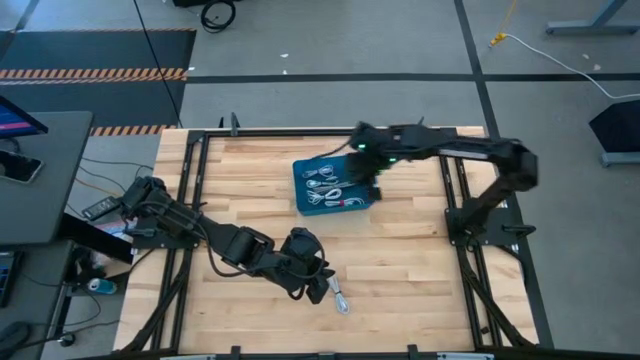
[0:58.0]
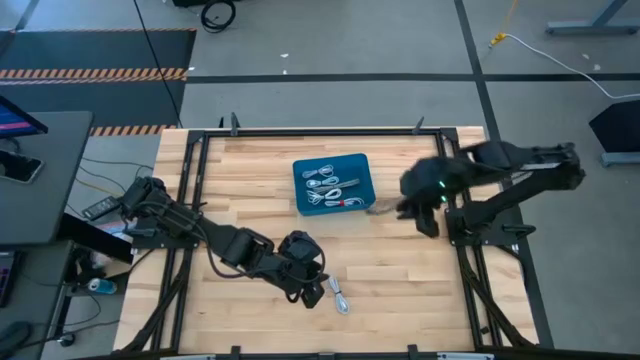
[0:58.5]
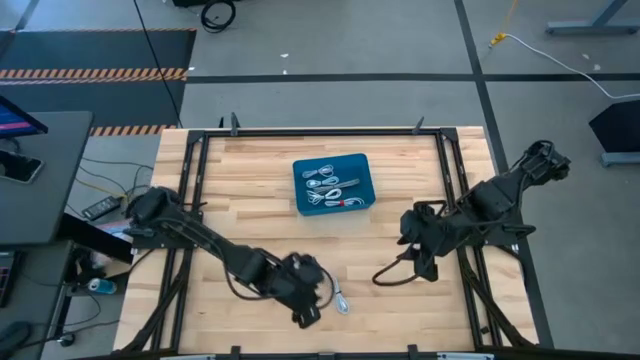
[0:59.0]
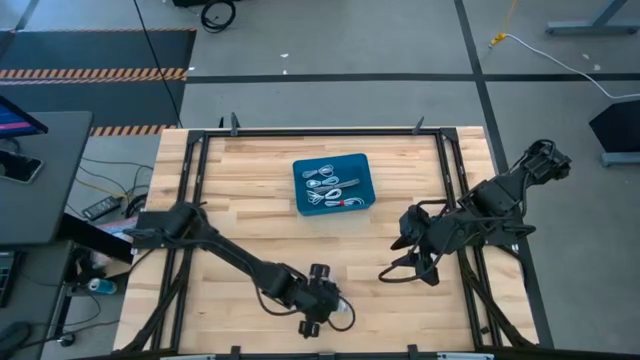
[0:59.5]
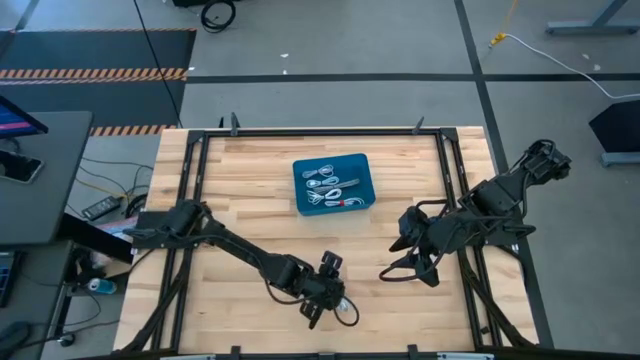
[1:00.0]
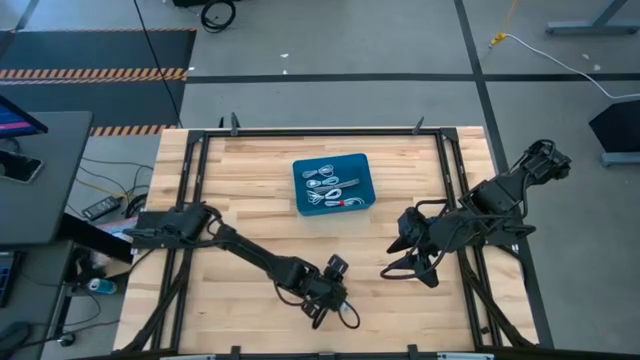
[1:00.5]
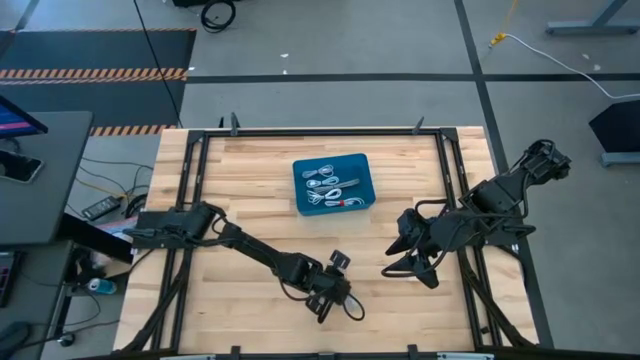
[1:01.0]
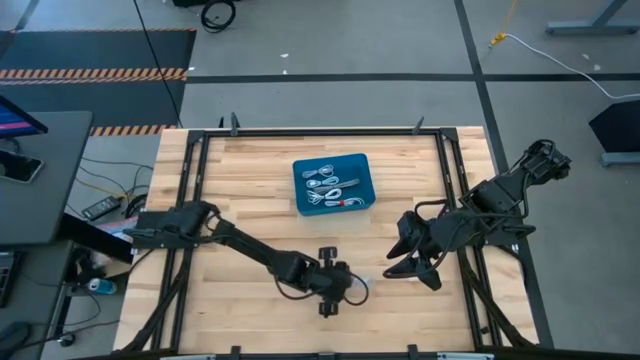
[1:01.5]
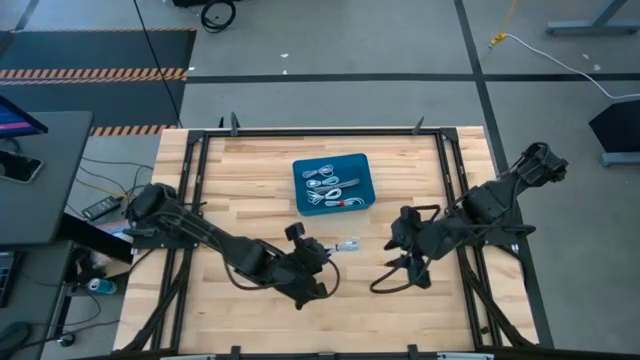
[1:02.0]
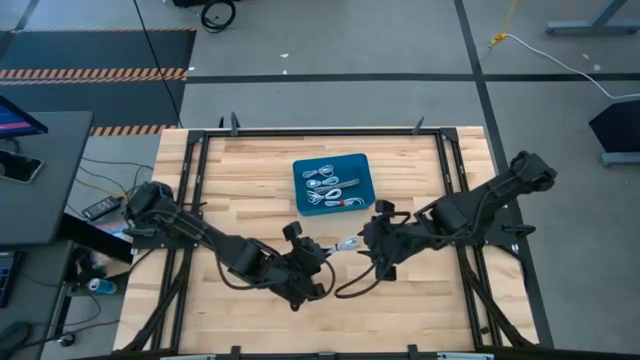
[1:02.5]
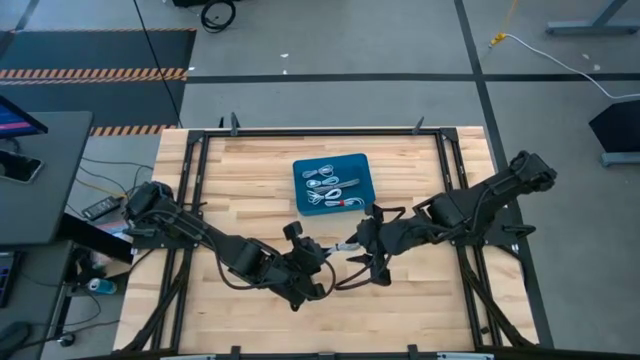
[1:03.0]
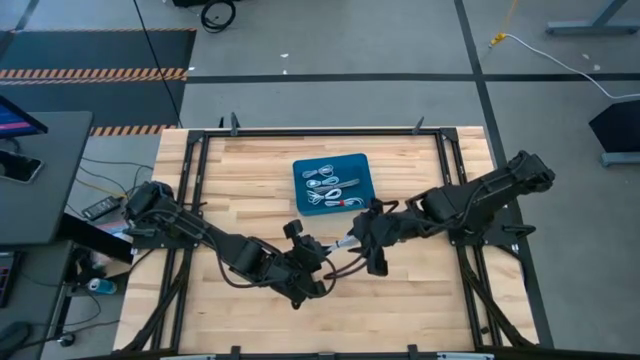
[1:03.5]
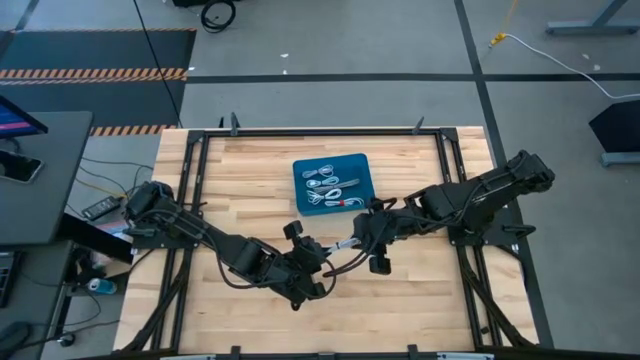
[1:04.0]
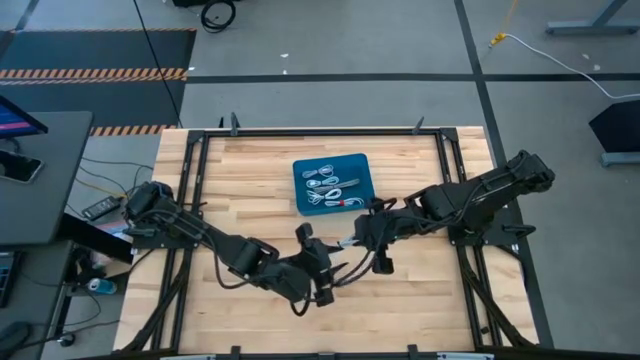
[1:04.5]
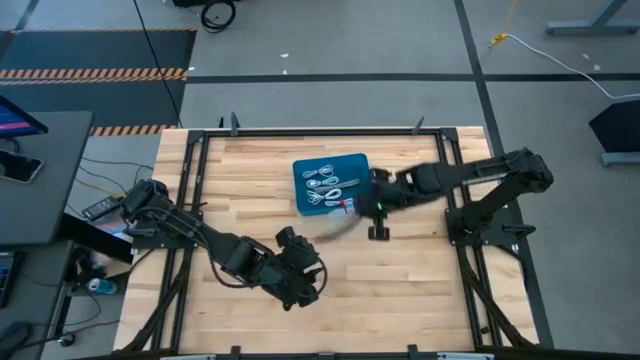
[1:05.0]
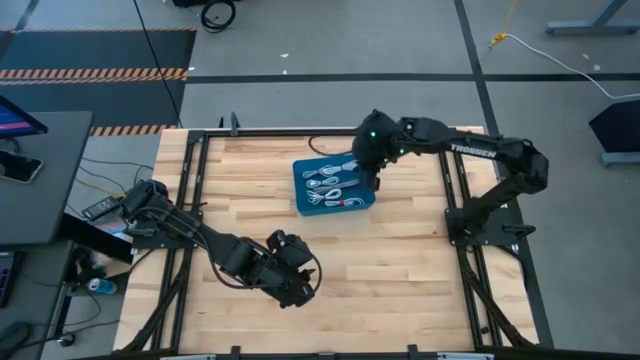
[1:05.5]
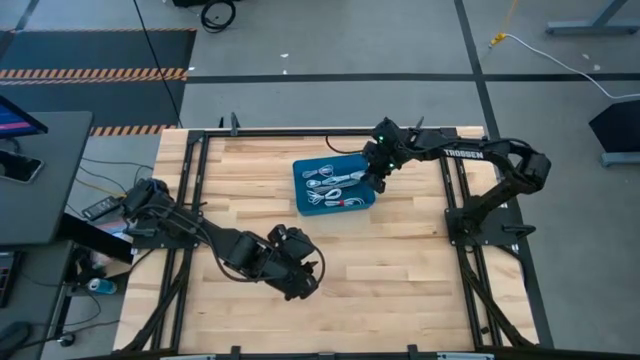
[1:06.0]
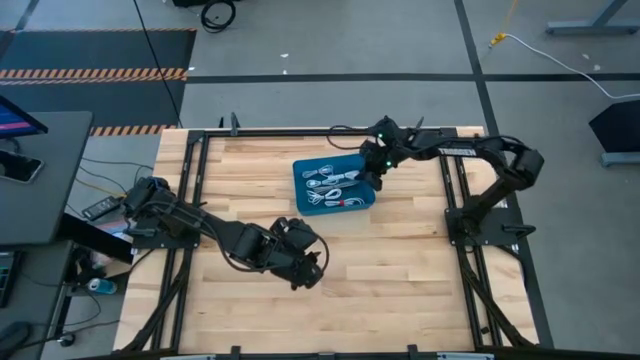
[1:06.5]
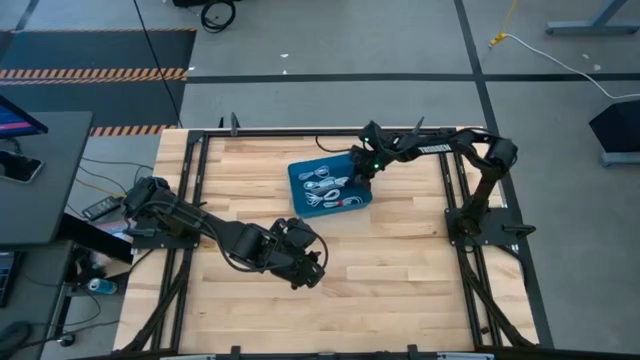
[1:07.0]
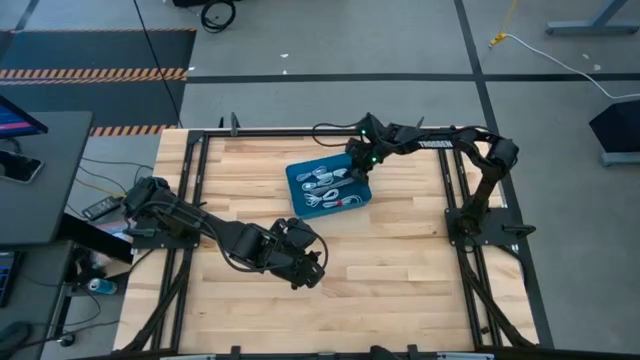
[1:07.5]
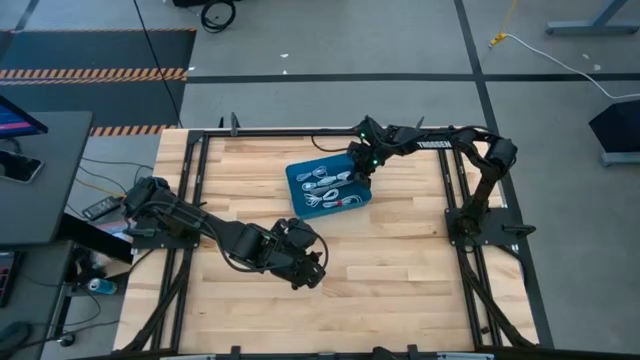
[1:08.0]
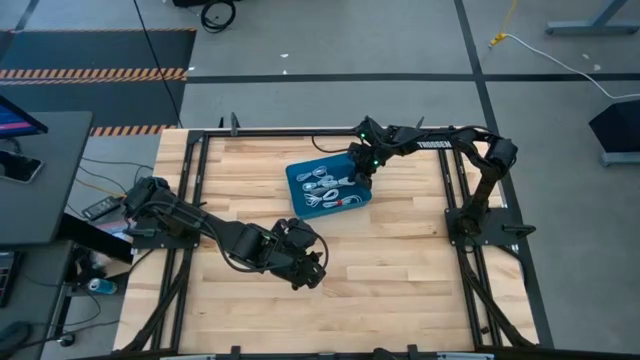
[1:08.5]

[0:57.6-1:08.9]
Task: Pick and place USB-C Cables
Put the white charger cable into the blue bin

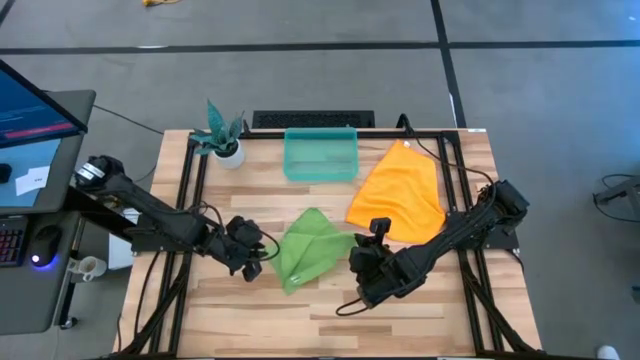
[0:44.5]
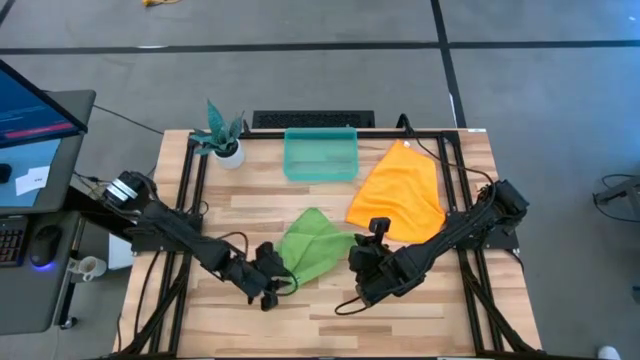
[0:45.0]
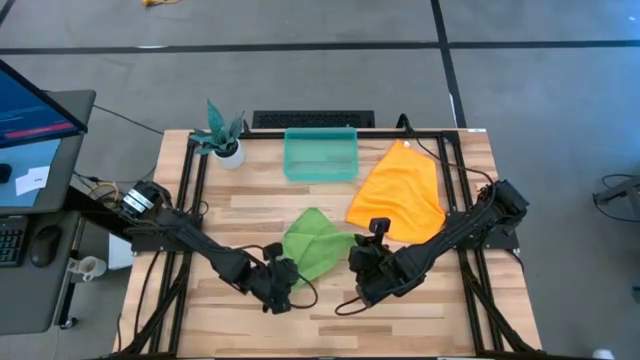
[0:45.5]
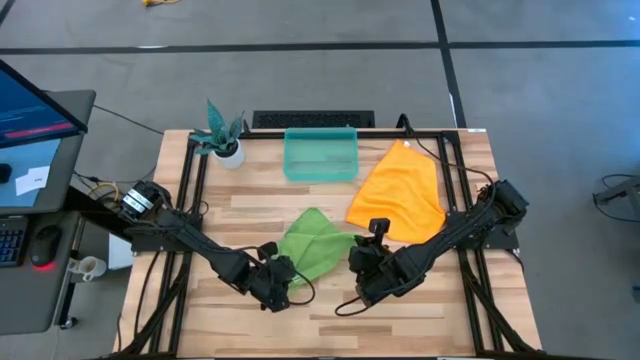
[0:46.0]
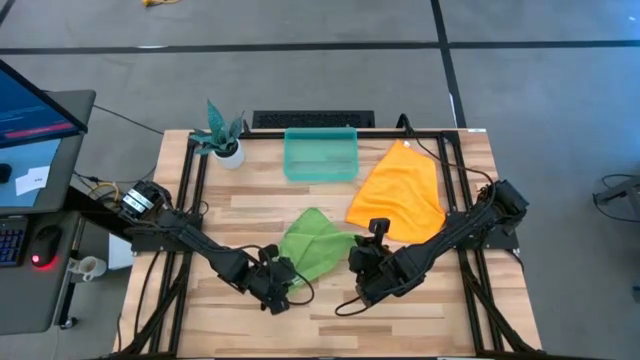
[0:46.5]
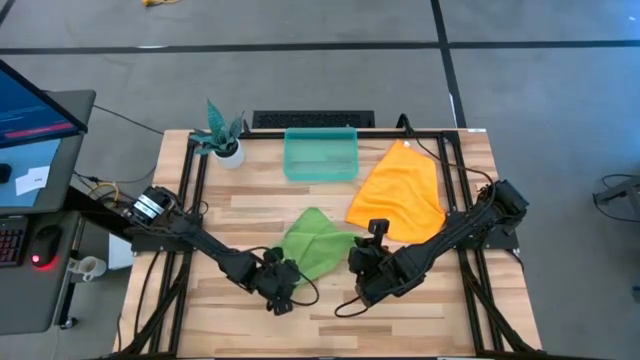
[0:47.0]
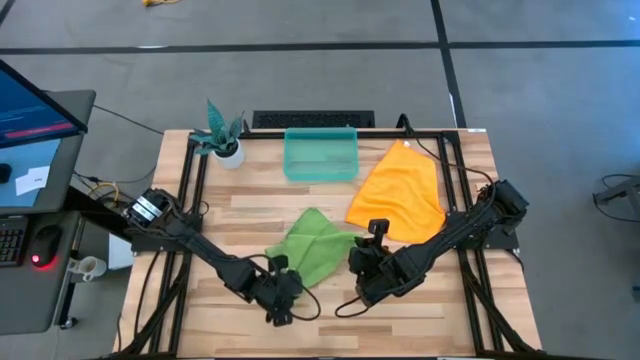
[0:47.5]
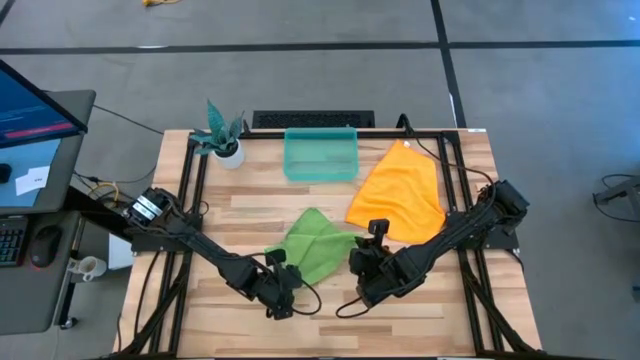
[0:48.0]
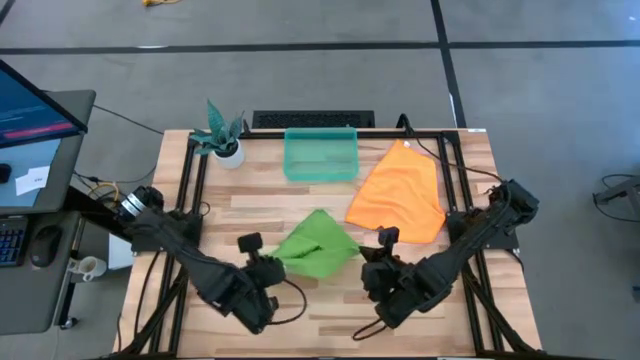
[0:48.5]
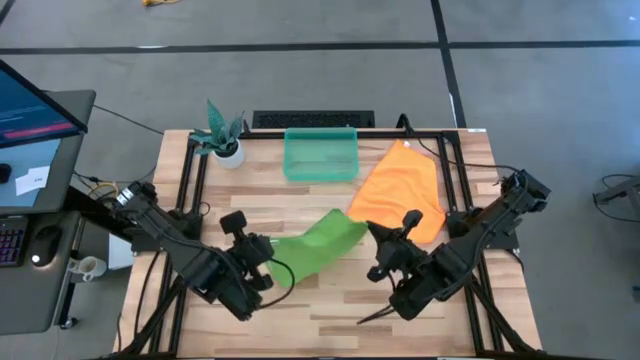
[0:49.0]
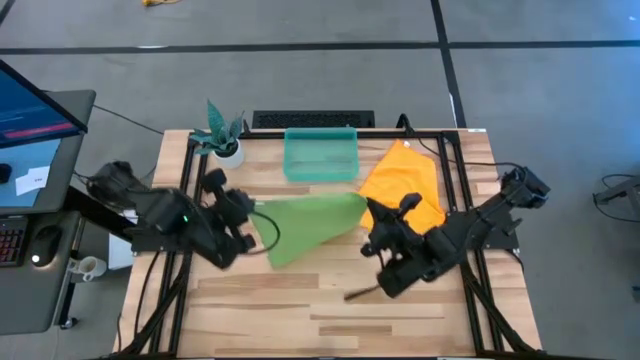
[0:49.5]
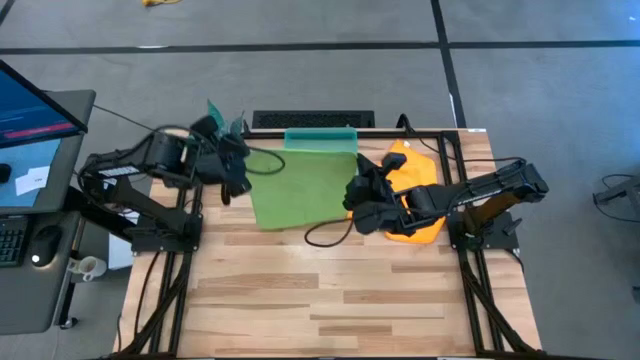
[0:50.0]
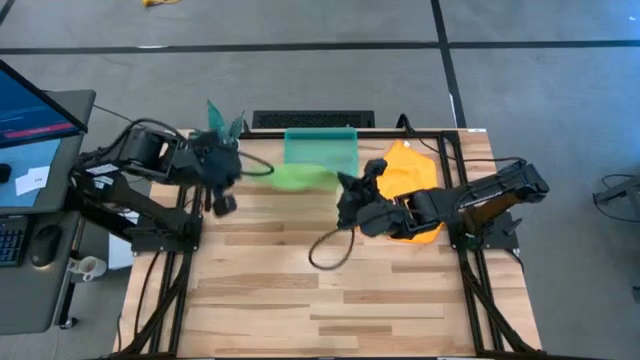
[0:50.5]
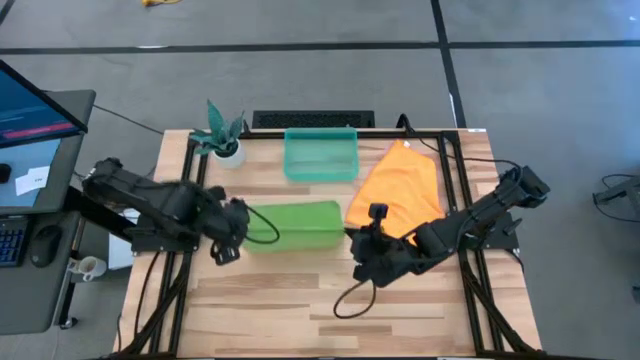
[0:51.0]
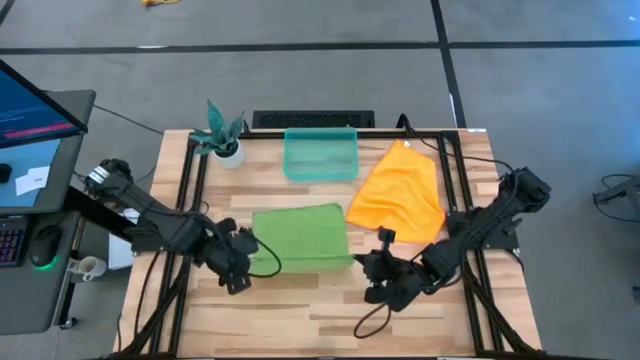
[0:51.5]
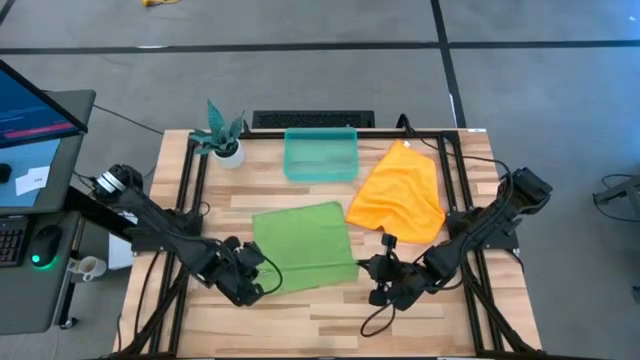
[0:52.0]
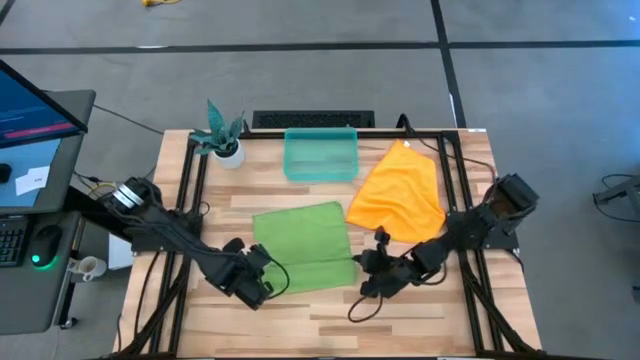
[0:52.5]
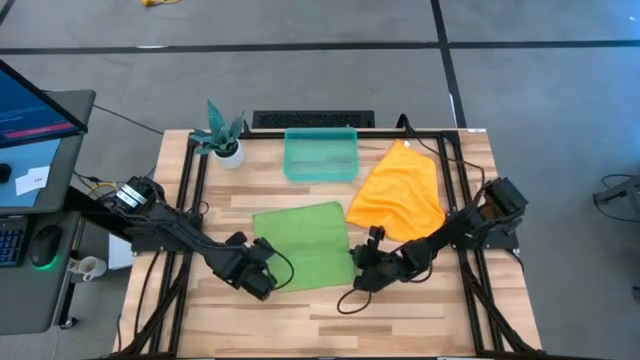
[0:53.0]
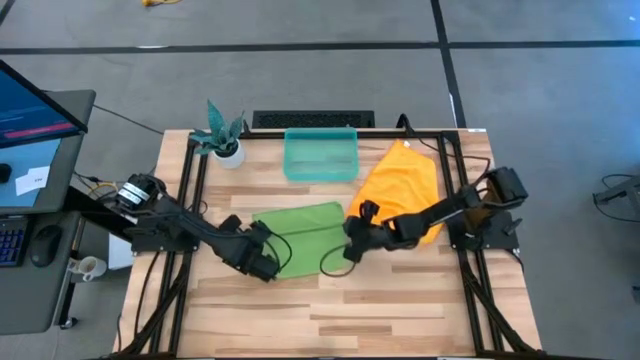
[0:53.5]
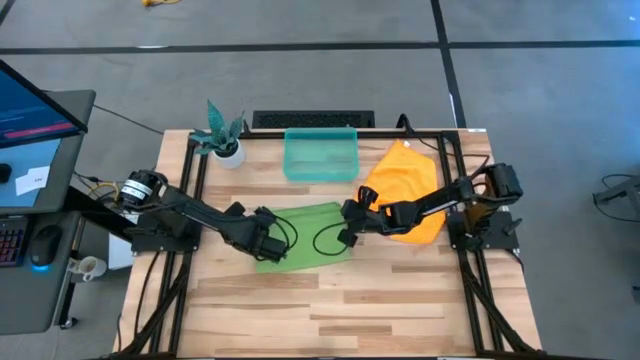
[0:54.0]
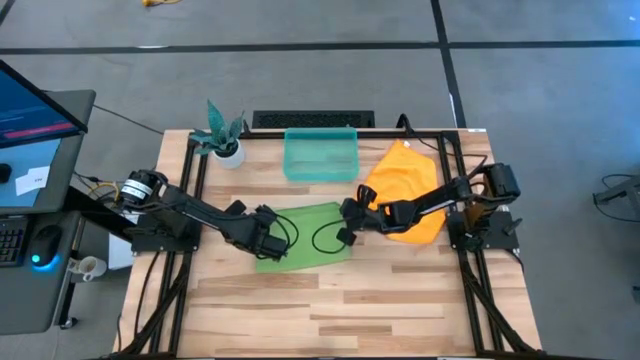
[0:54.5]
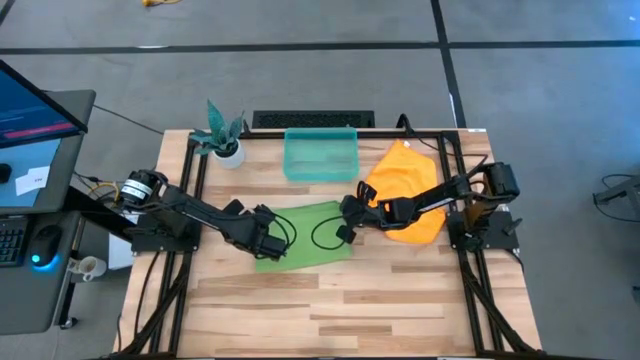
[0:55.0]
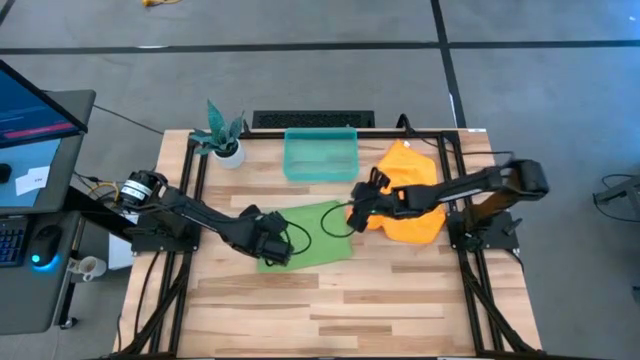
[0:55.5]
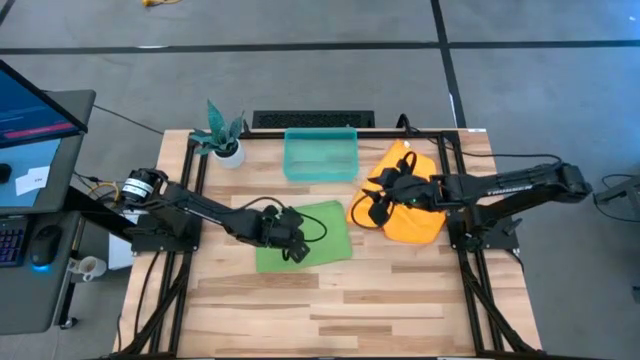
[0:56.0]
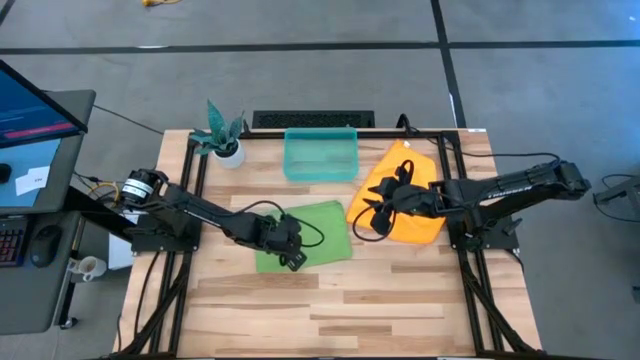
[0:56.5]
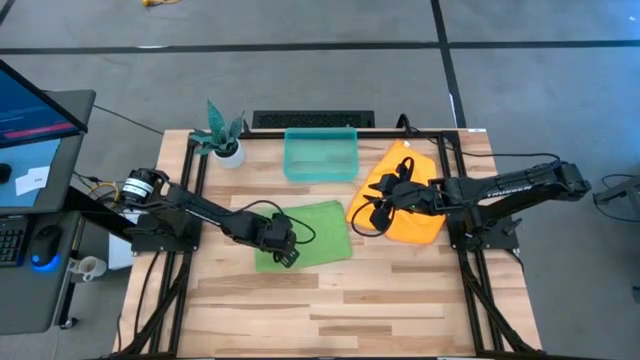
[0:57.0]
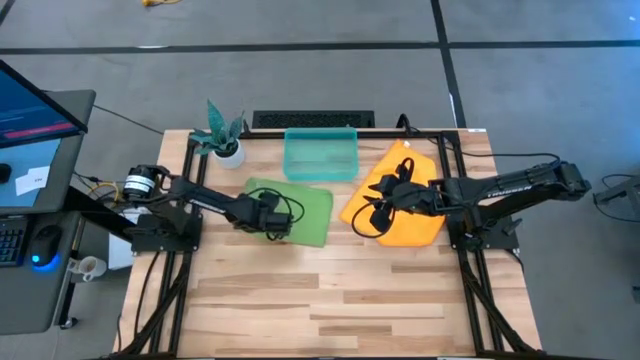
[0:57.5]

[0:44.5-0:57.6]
Task: Roll microfiber towels into tight, uniform cylinder then place into a basket
Fold the green towel
